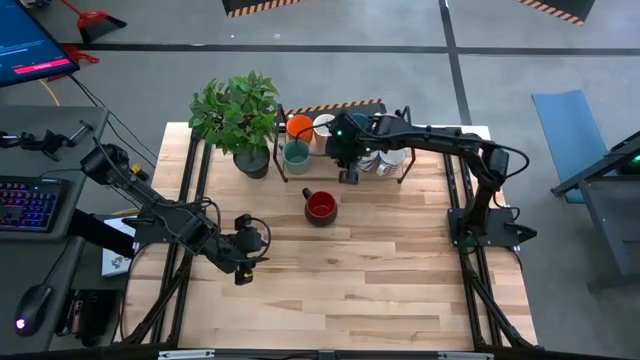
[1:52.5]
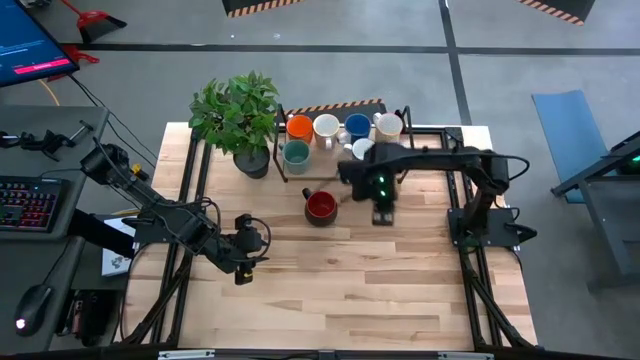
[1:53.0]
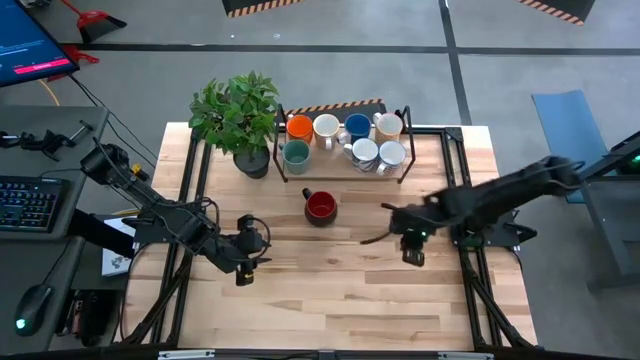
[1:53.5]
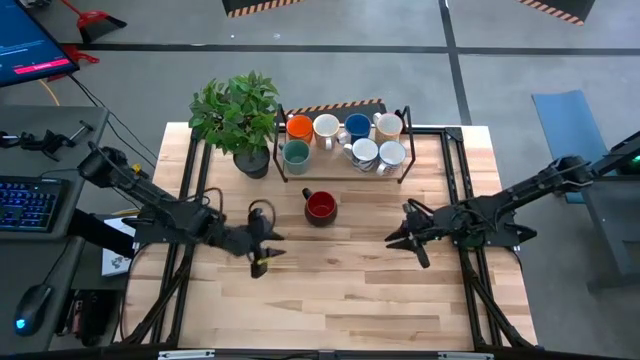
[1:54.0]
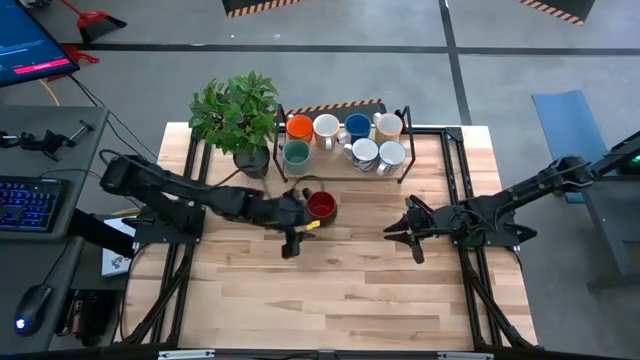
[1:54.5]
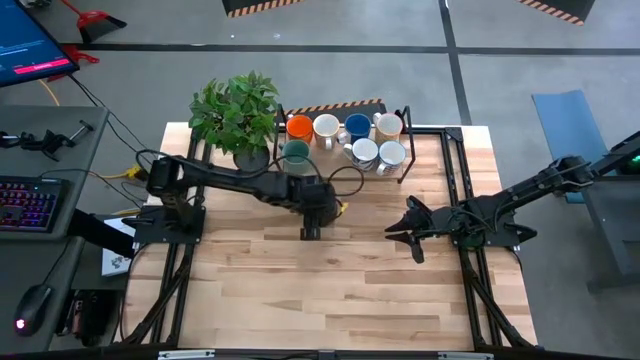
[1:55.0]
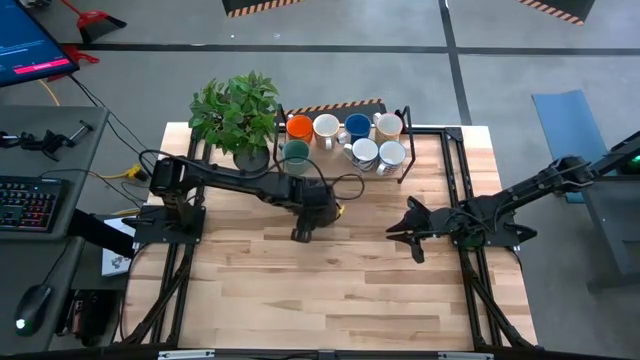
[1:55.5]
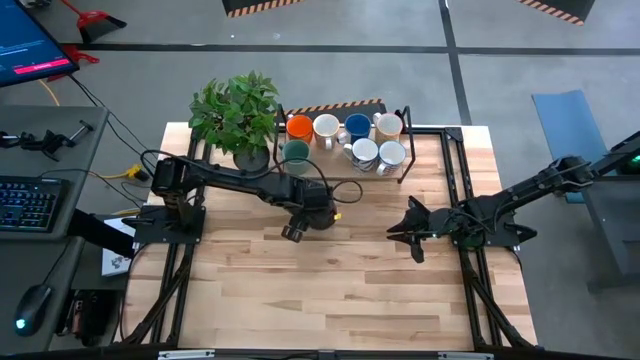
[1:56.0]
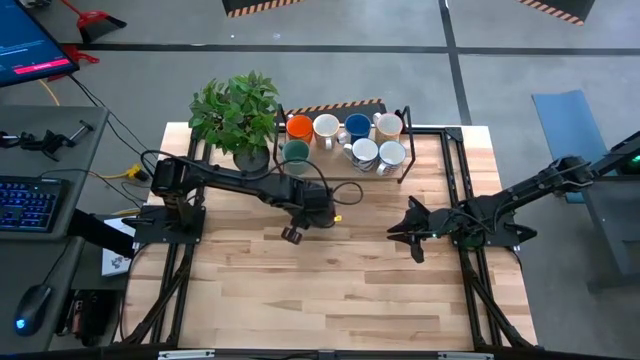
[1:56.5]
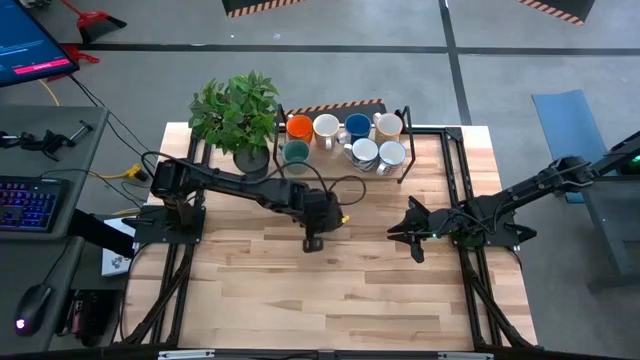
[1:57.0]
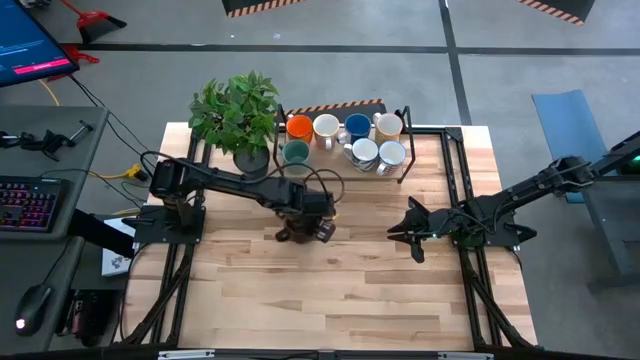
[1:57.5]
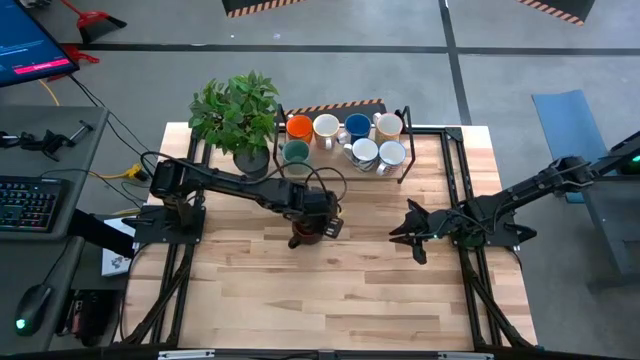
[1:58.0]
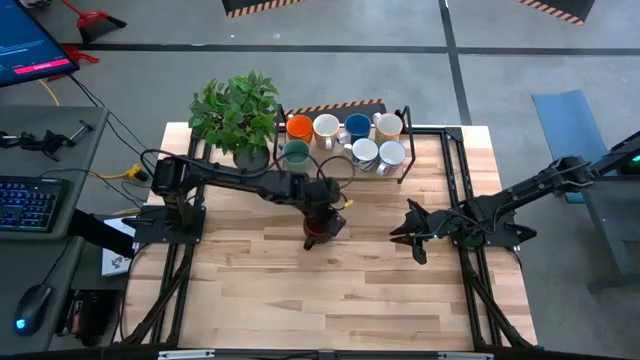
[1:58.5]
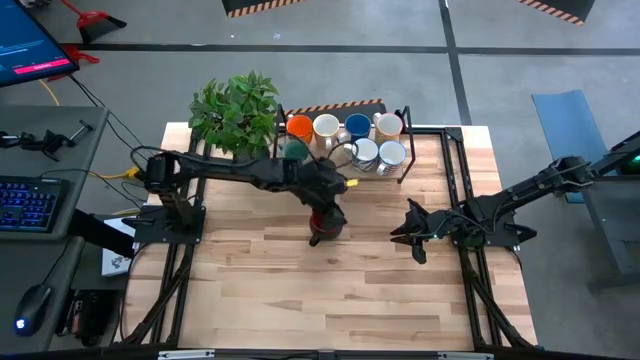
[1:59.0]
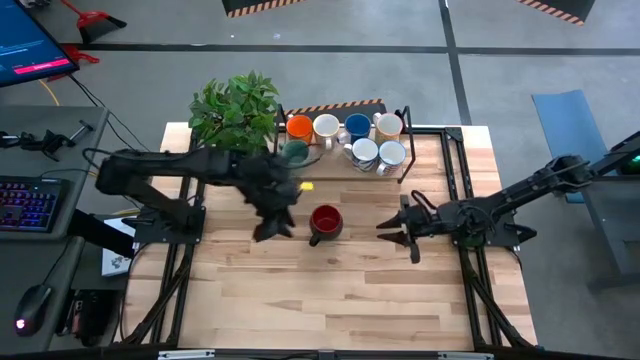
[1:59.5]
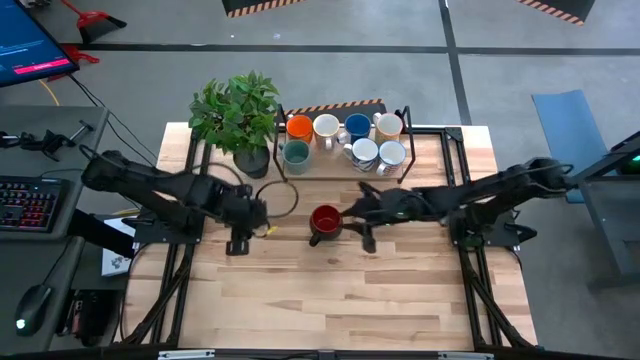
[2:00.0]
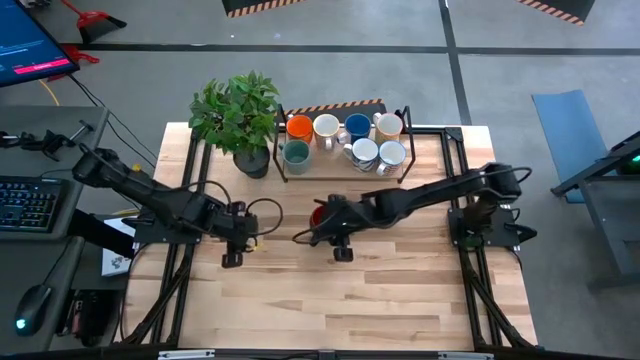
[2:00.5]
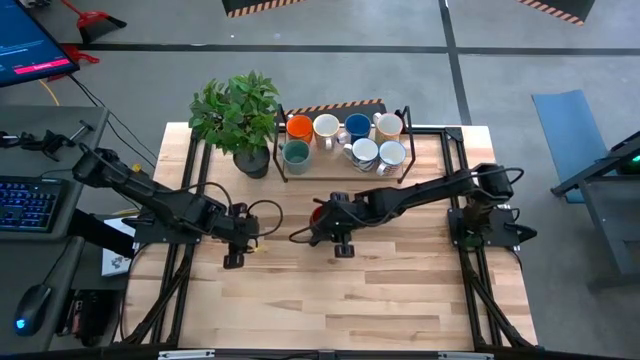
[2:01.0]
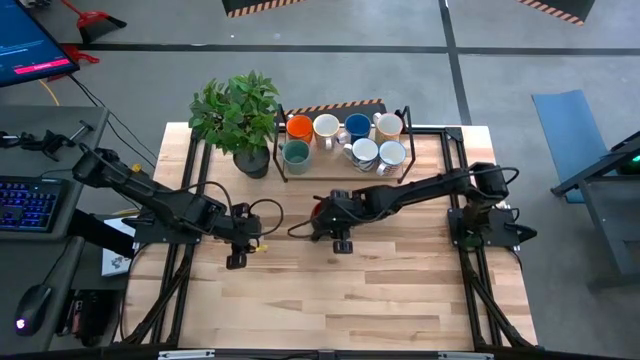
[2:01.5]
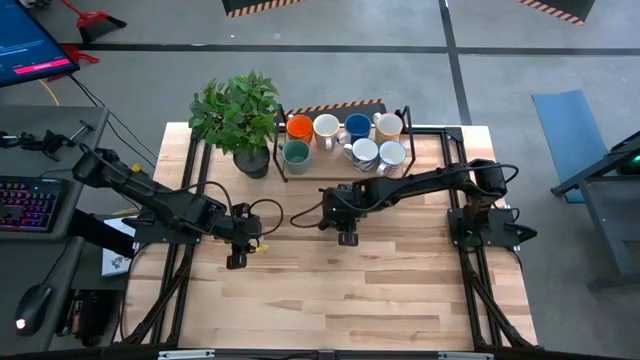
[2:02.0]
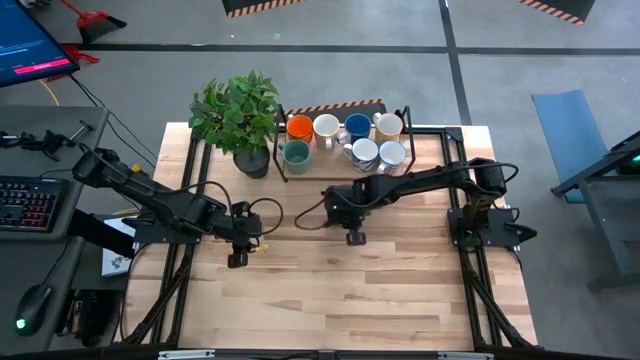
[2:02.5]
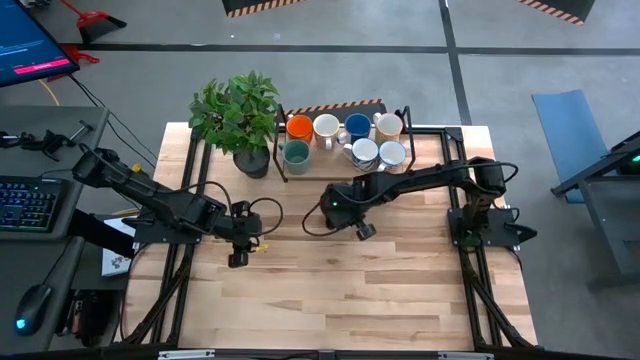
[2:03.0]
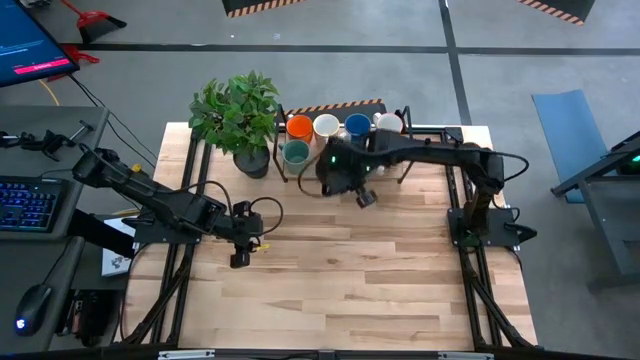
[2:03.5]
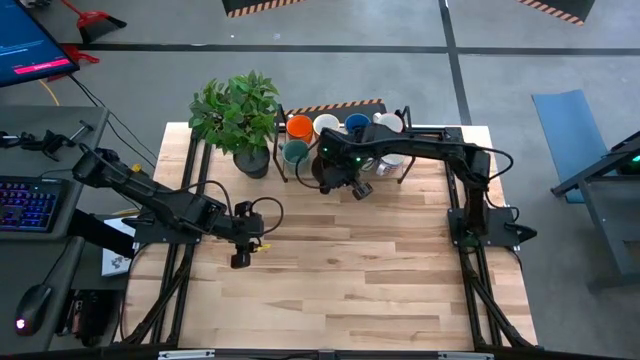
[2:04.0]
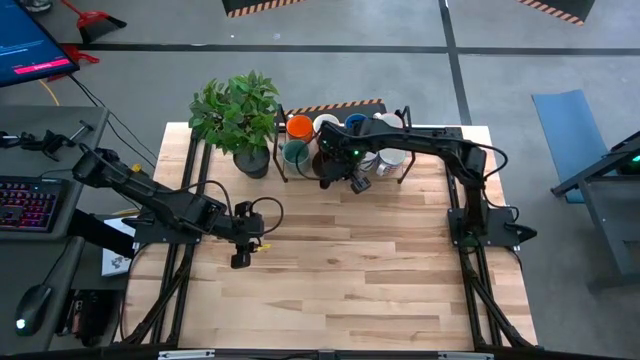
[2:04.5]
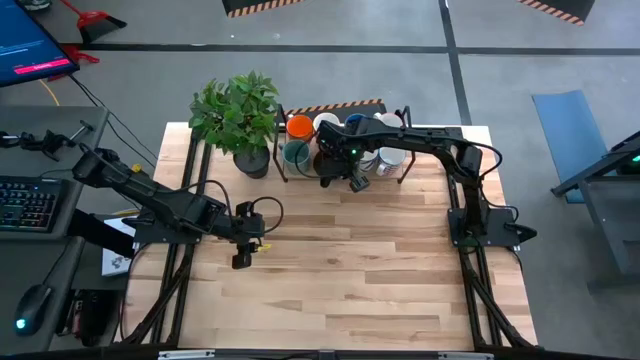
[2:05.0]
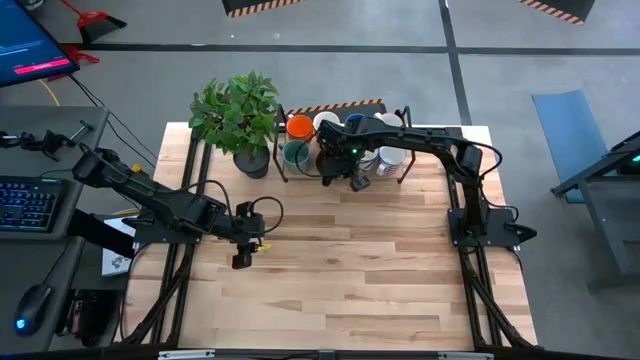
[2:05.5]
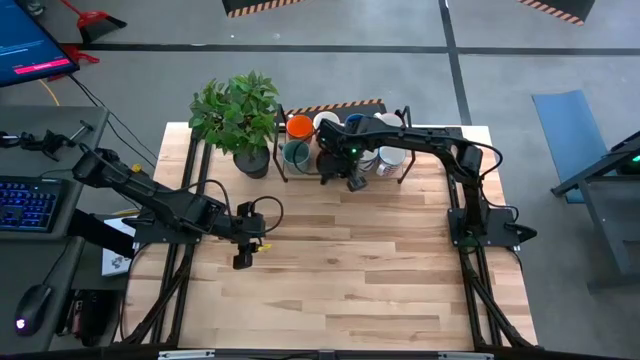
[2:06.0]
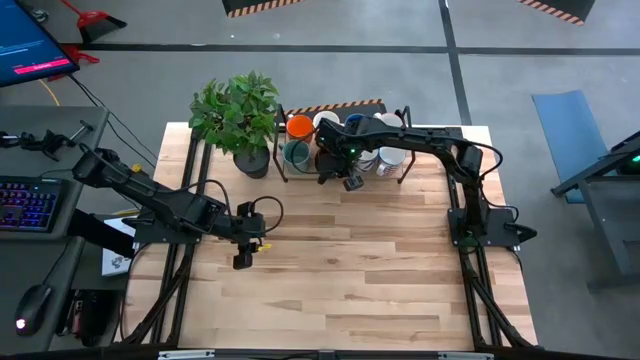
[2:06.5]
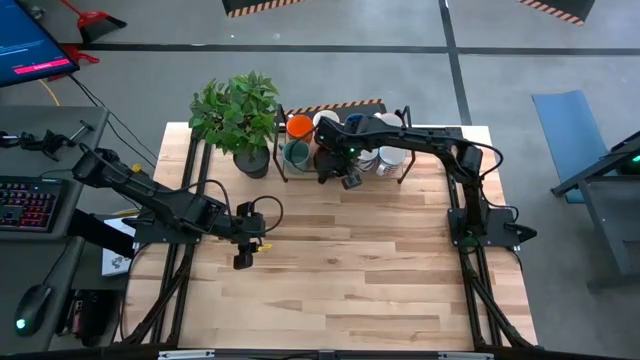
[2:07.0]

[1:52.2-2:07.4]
Task: Place coffee mugs
Put the black mug on the shelf

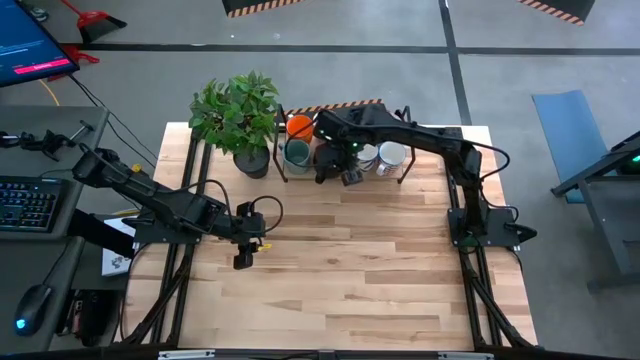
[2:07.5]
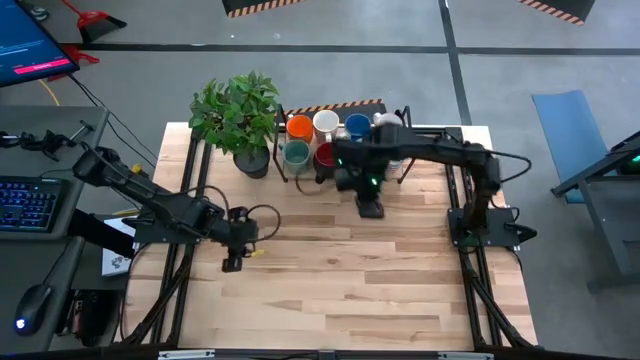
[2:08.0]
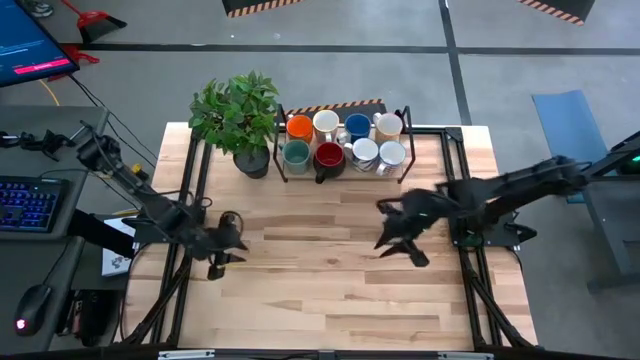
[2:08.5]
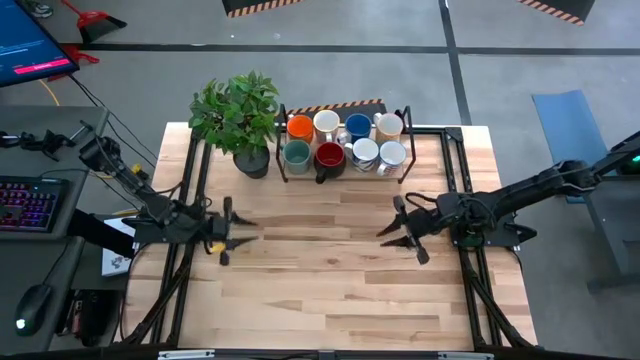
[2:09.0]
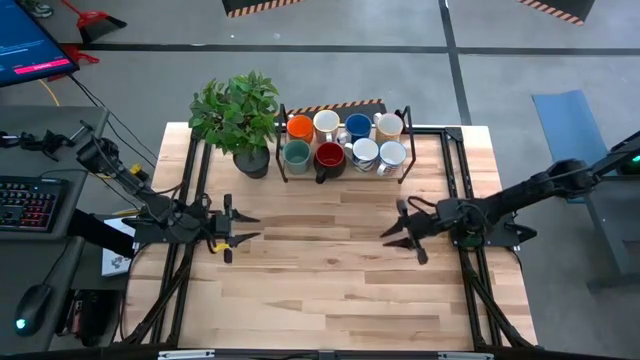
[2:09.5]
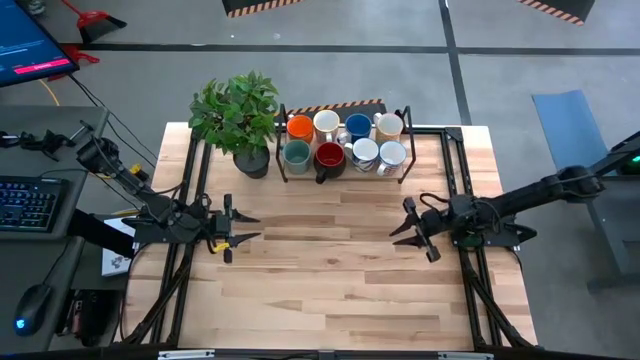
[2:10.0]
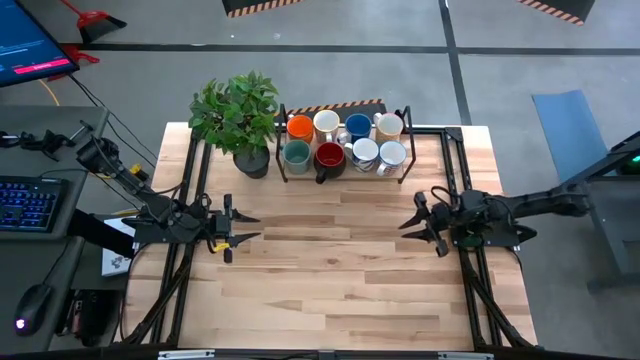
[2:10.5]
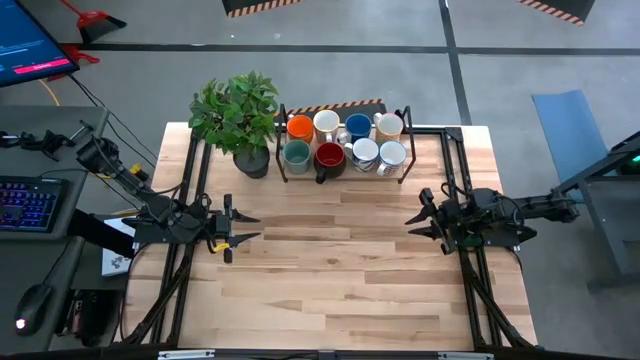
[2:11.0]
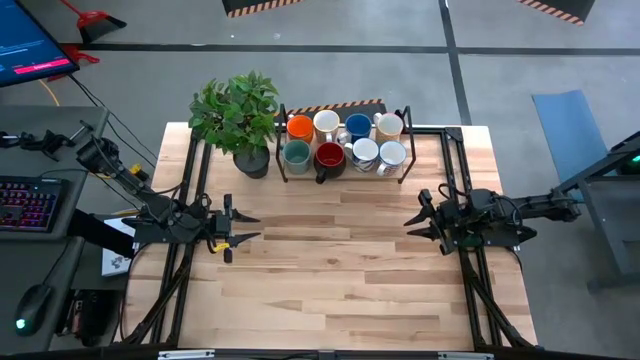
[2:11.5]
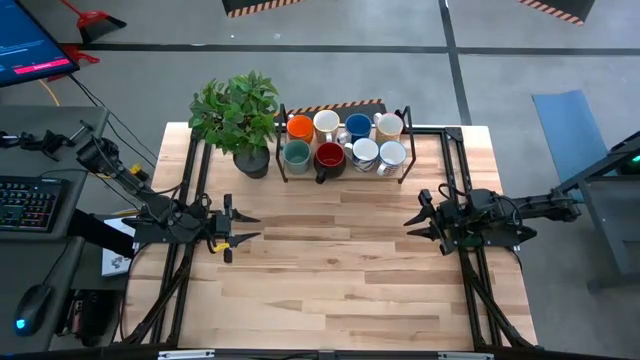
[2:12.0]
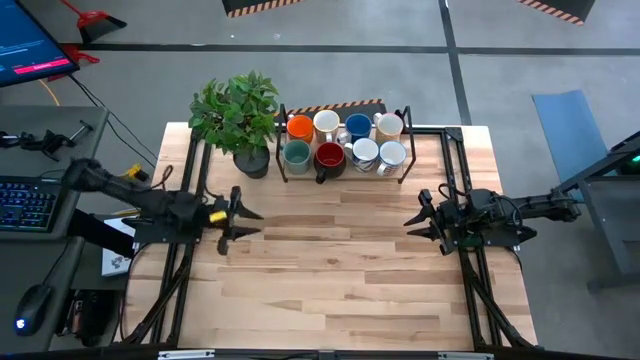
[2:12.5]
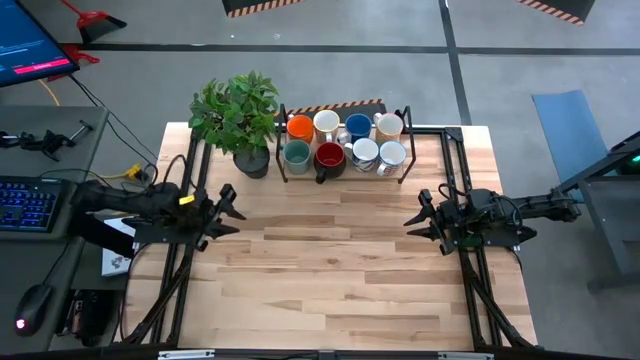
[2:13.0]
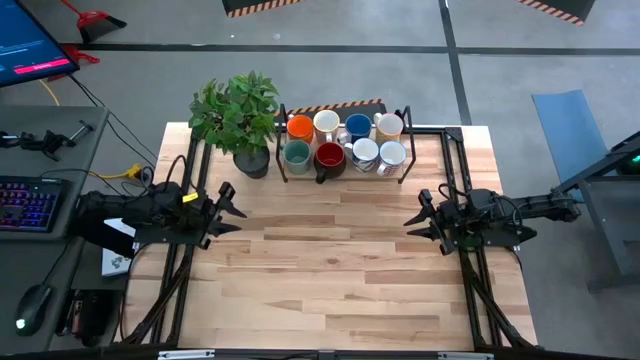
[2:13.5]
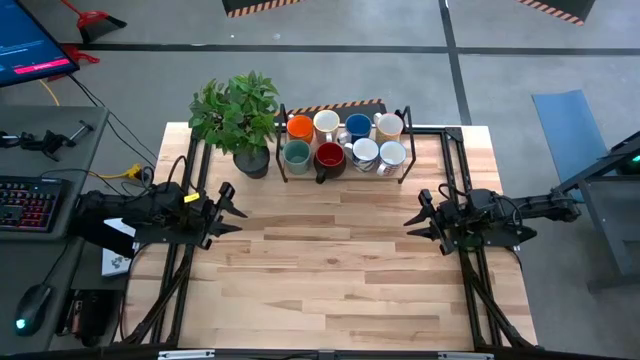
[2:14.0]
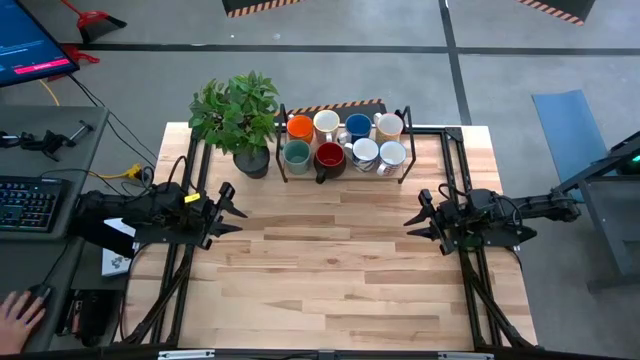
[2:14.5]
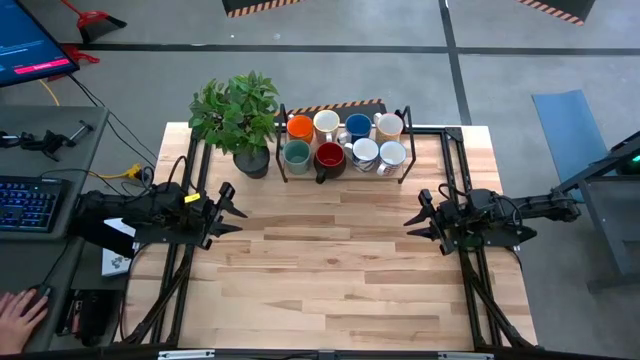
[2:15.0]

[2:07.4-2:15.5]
Return to Home Position
